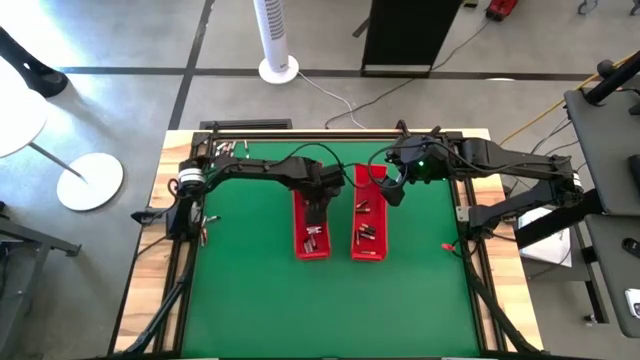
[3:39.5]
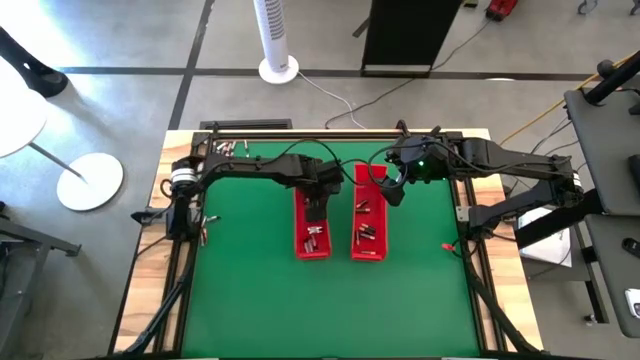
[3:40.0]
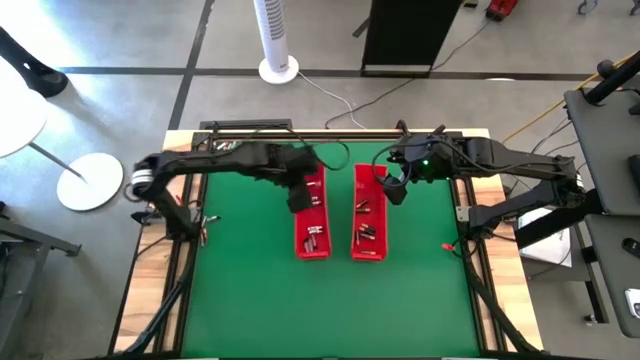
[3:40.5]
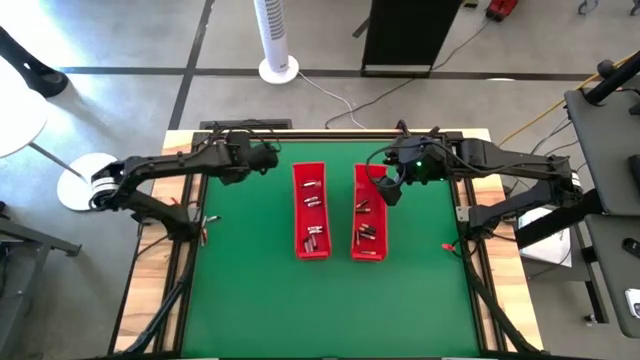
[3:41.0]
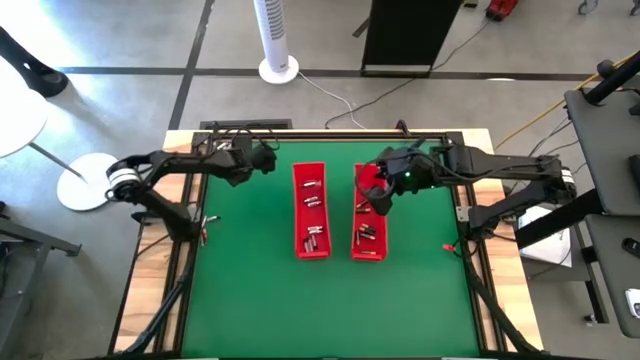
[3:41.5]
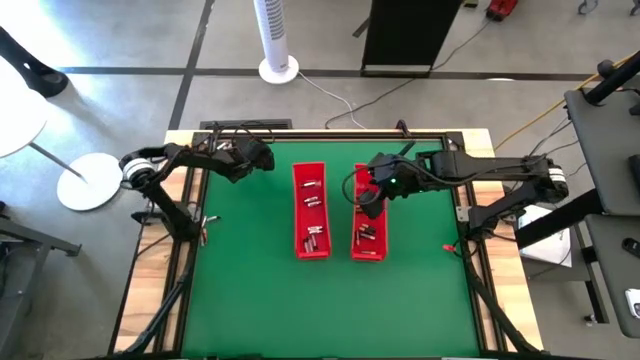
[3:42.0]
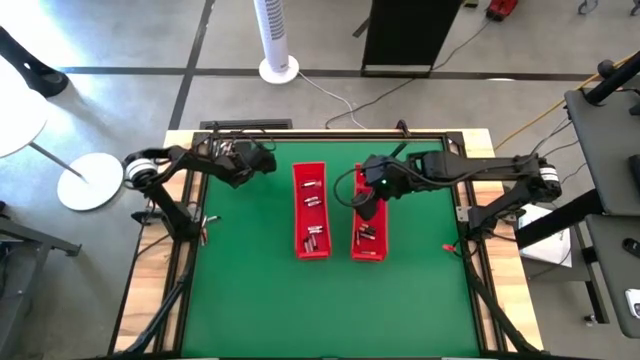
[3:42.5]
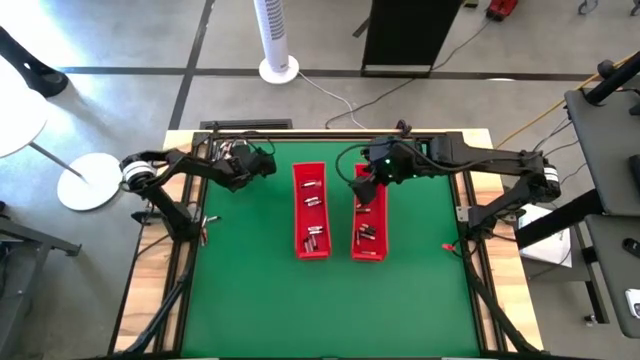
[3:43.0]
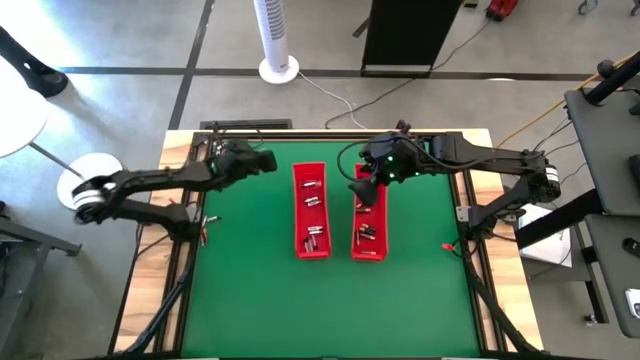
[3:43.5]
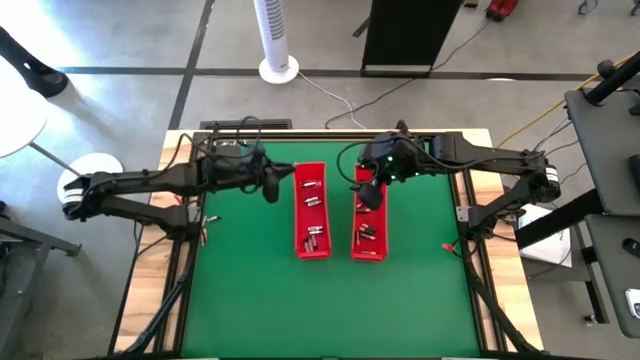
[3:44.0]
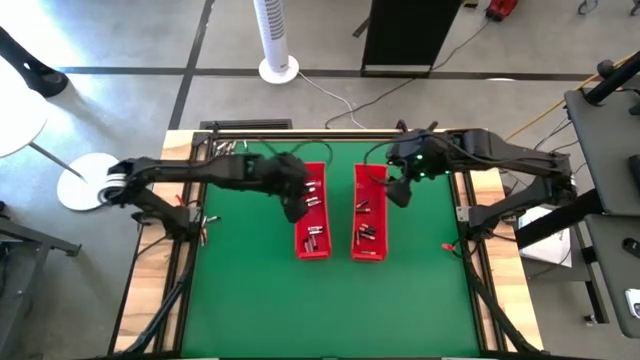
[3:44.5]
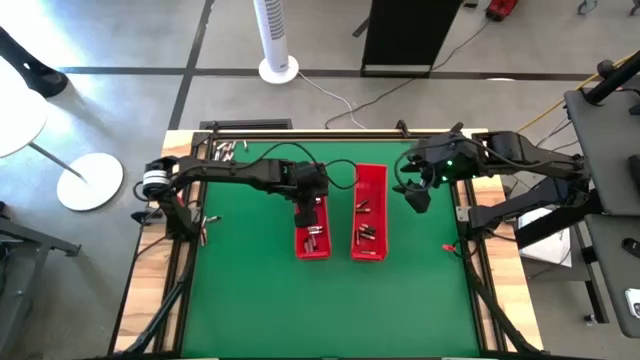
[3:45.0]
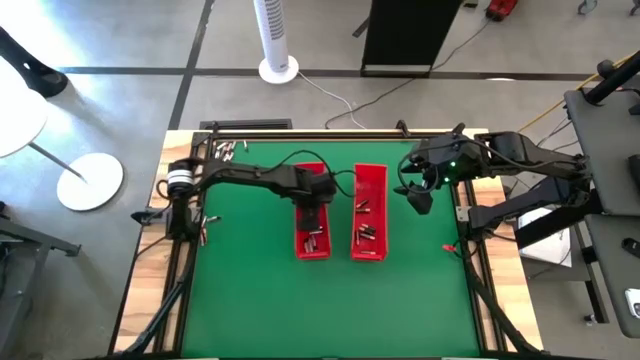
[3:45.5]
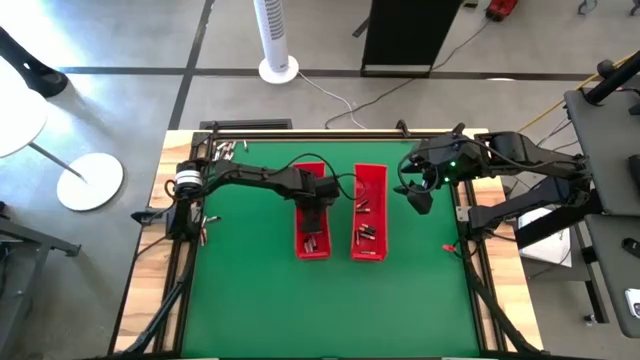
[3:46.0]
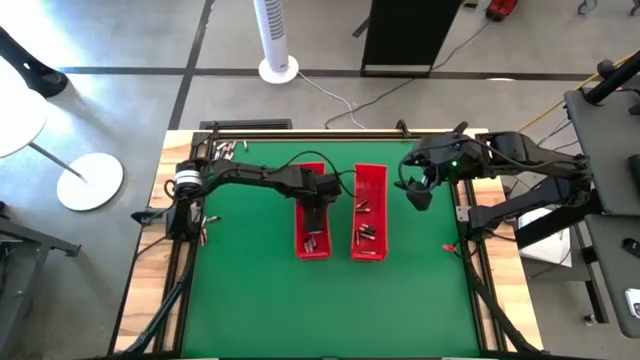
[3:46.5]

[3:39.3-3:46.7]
Task: Sort batteries
Put the silver battery into the left red bin

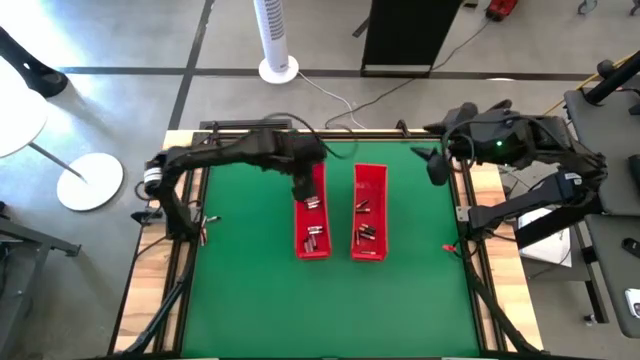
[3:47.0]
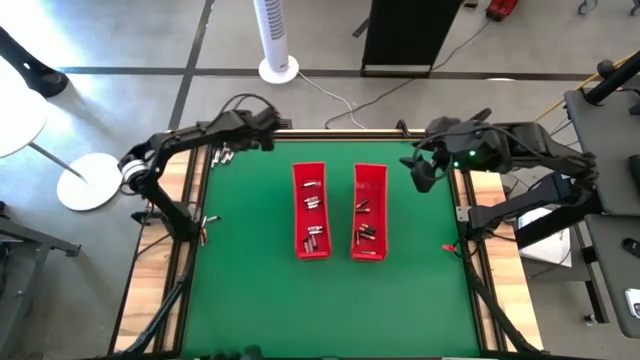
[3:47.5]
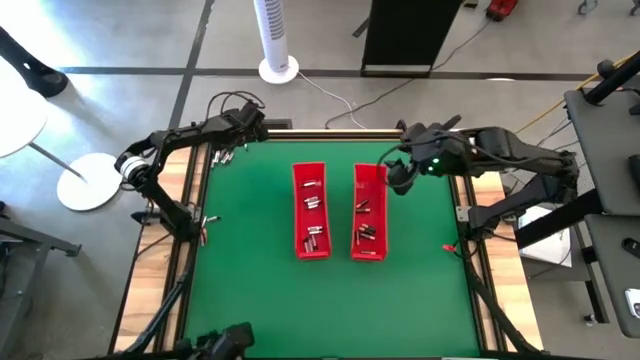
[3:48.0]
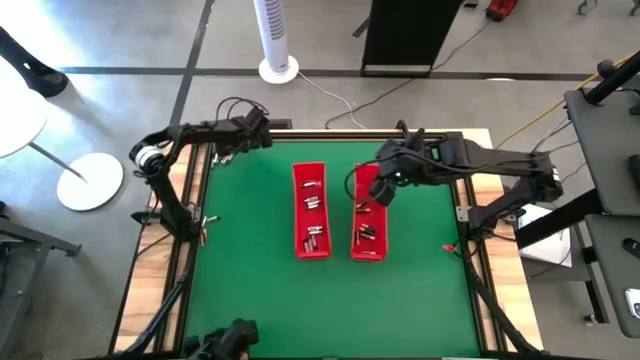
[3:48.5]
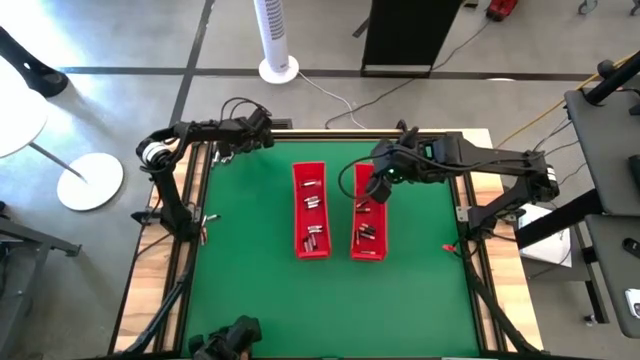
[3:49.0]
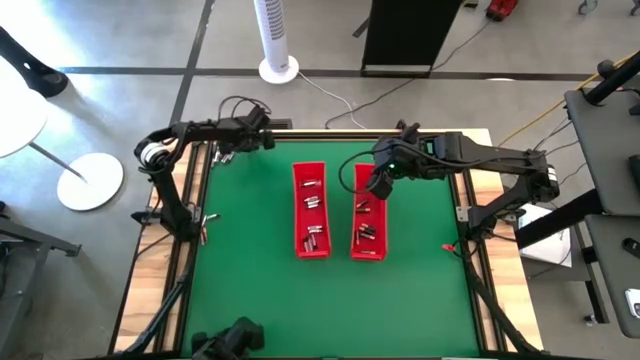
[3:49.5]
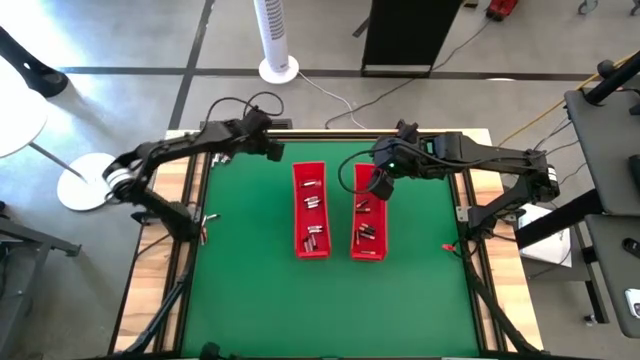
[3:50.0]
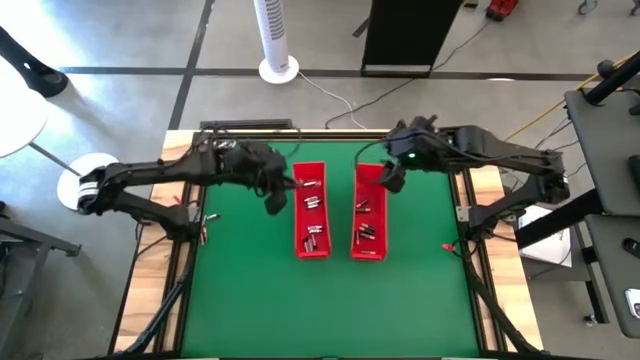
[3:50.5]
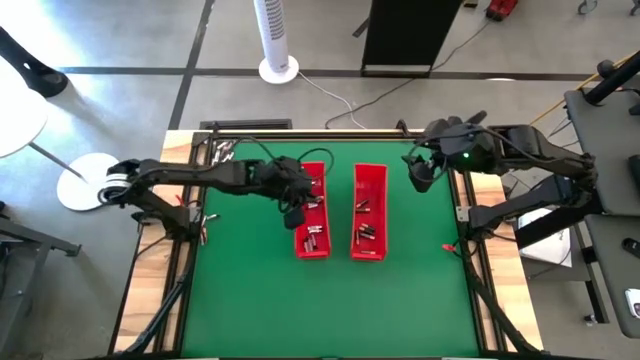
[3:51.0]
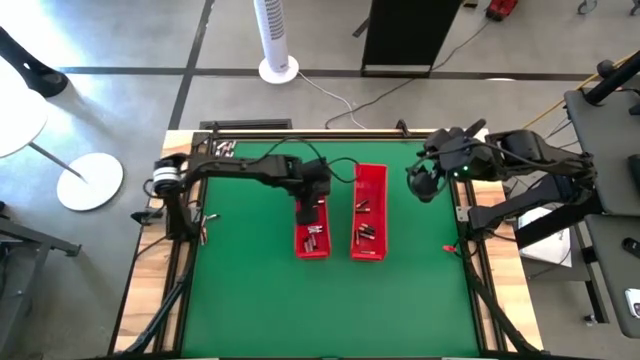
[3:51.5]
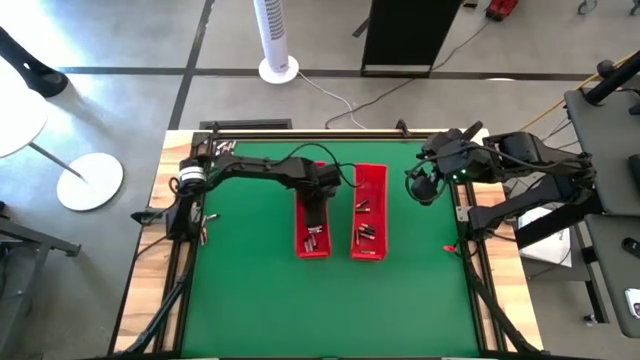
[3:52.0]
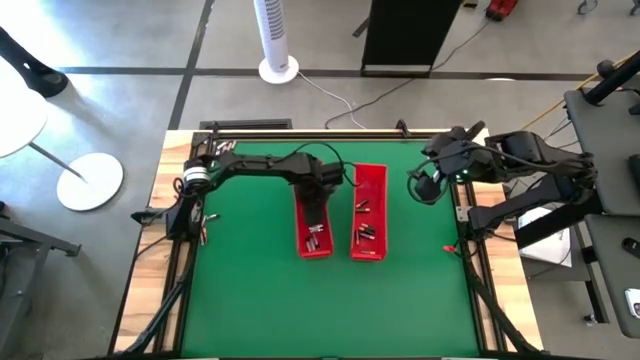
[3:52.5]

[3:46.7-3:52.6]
Put the silver battery into the left red bin

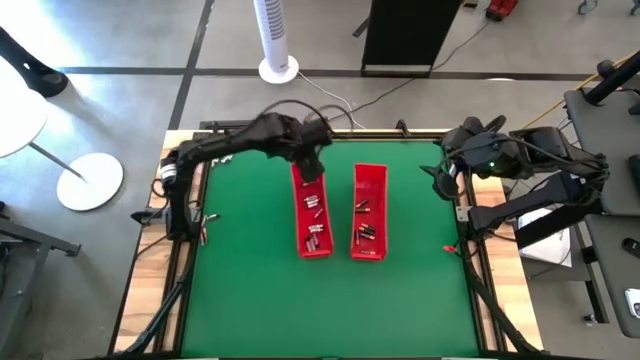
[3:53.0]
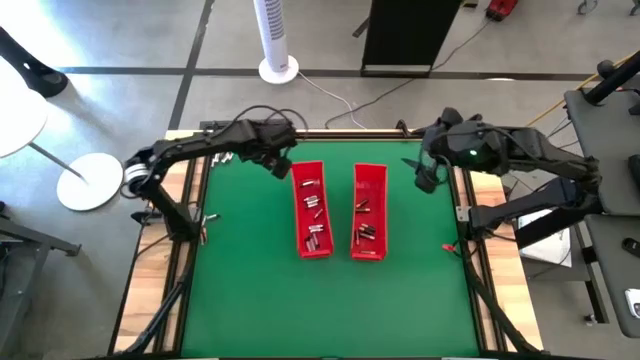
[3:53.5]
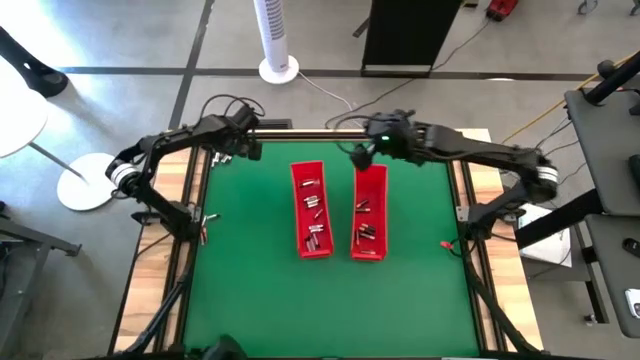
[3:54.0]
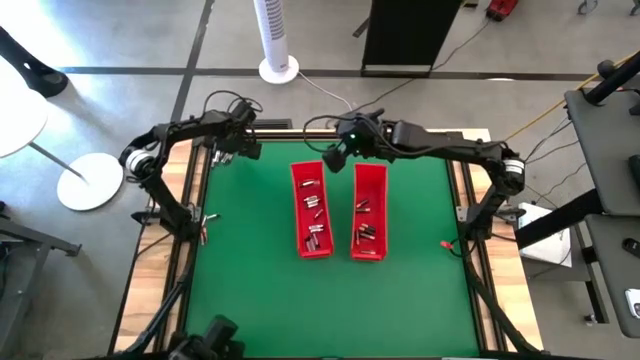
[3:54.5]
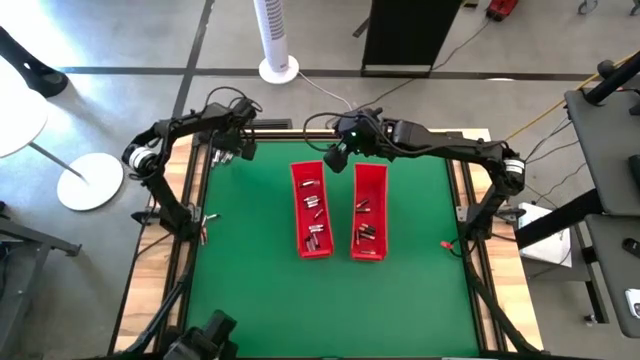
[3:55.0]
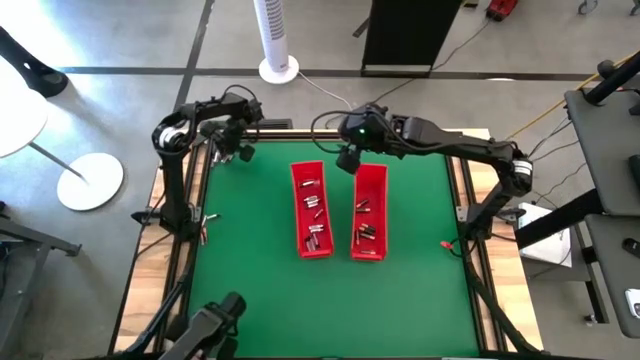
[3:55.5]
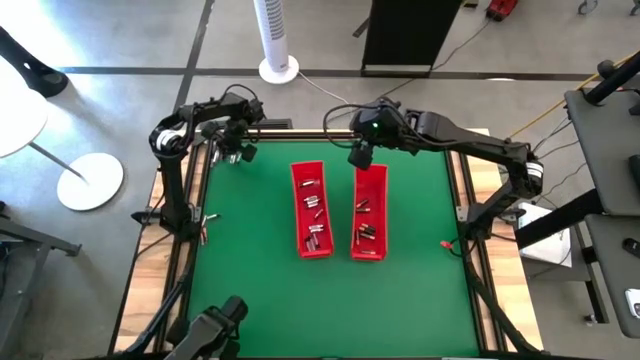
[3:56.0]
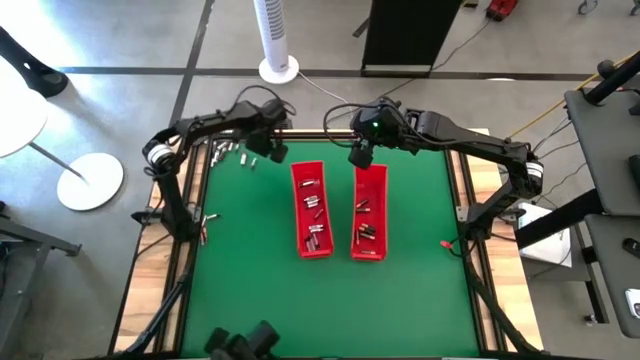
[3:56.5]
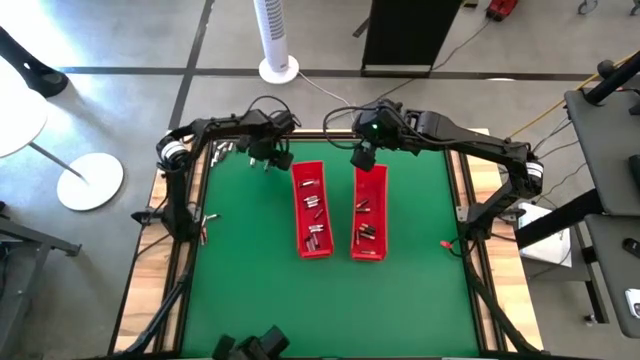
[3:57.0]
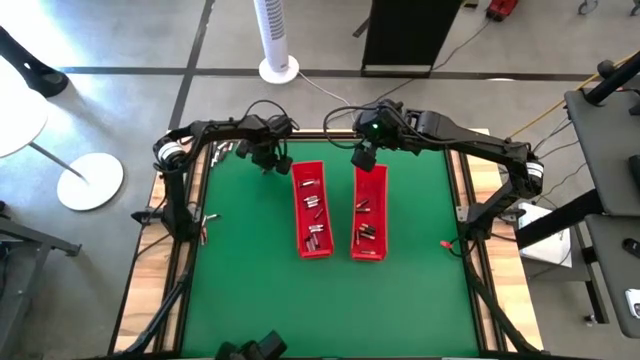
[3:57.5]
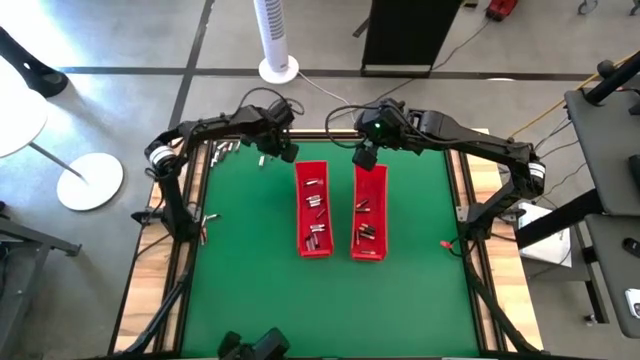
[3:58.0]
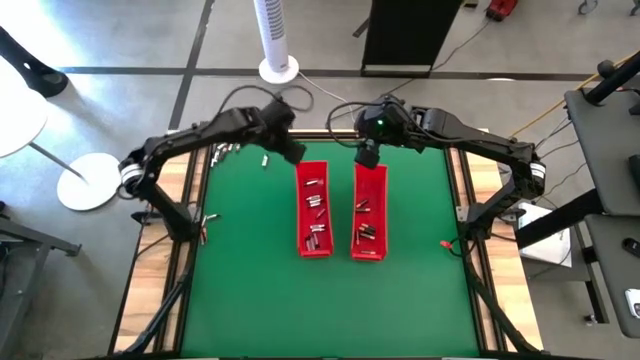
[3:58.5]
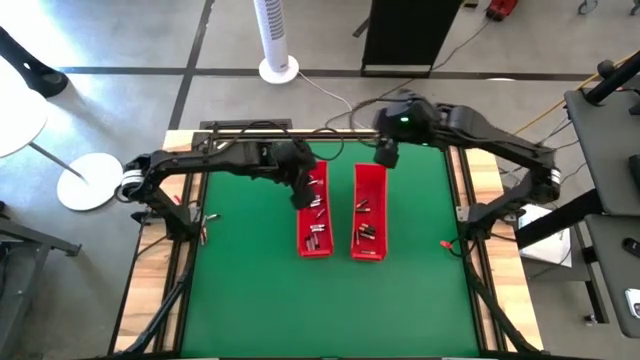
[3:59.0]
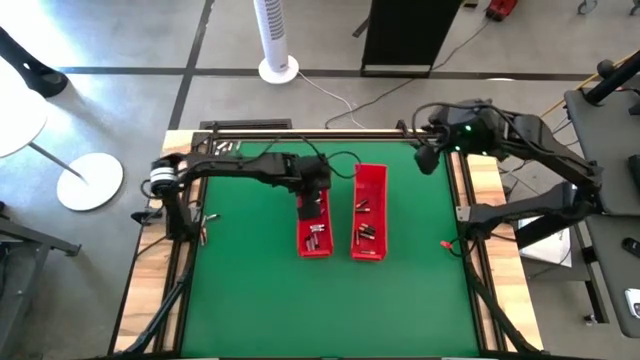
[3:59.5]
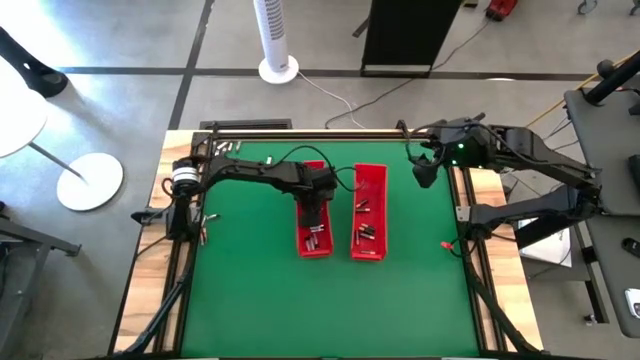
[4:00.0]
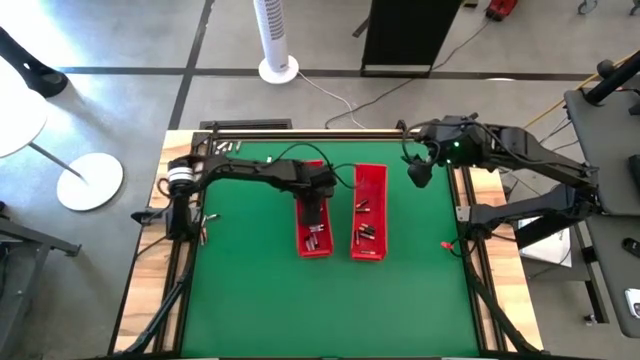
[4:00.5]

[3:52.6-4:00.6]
Put the silver battery into the left red bin
